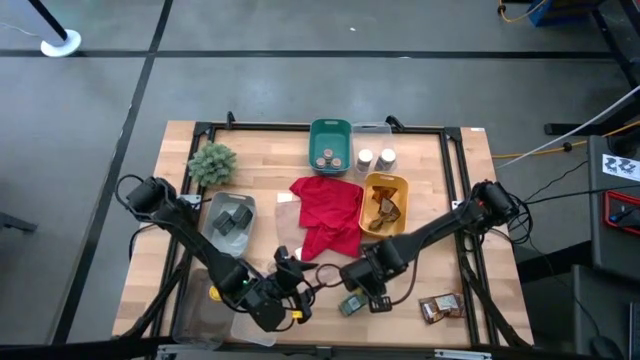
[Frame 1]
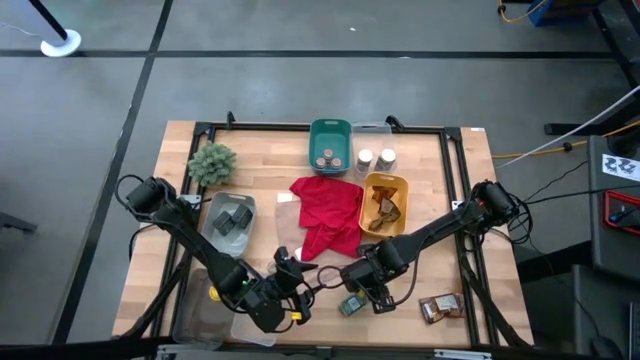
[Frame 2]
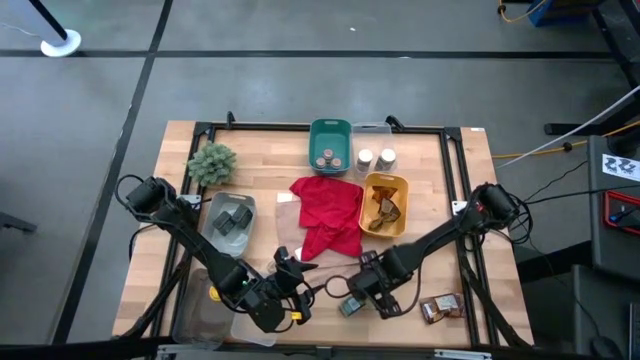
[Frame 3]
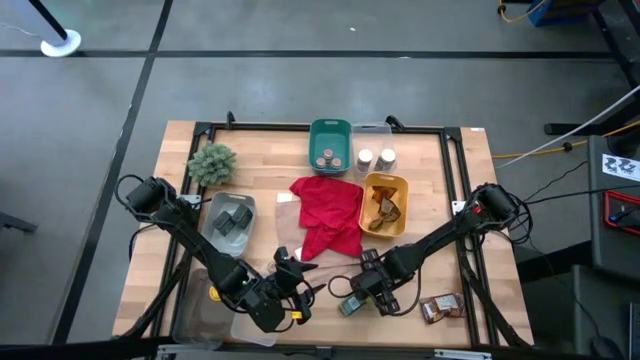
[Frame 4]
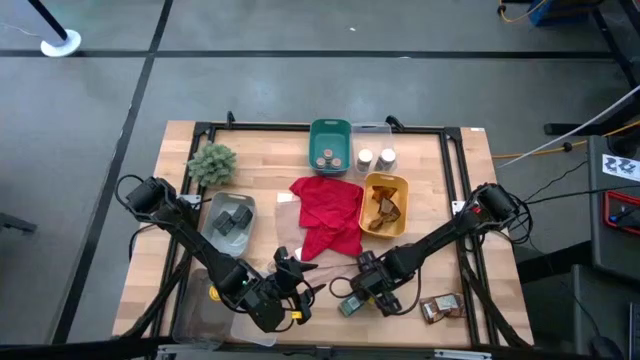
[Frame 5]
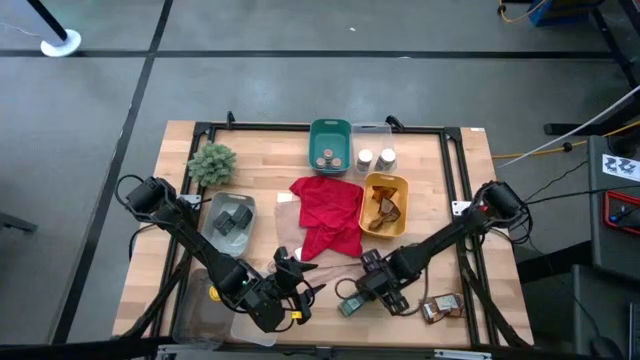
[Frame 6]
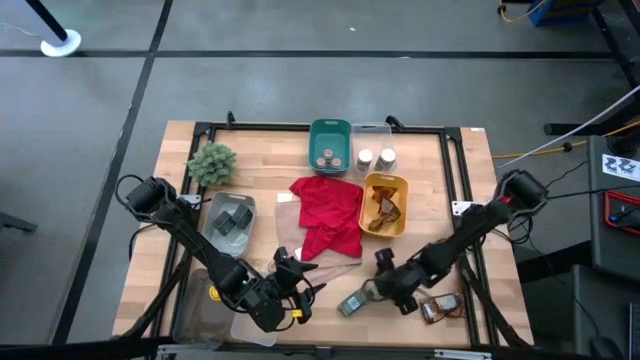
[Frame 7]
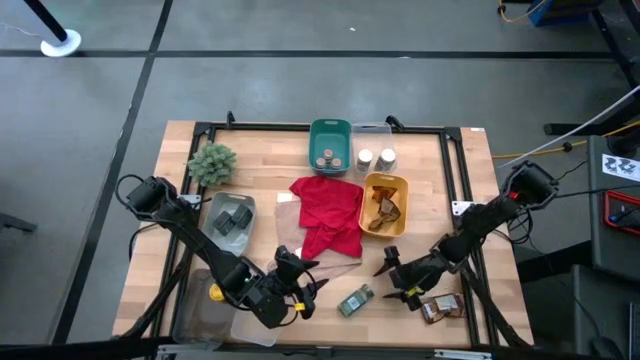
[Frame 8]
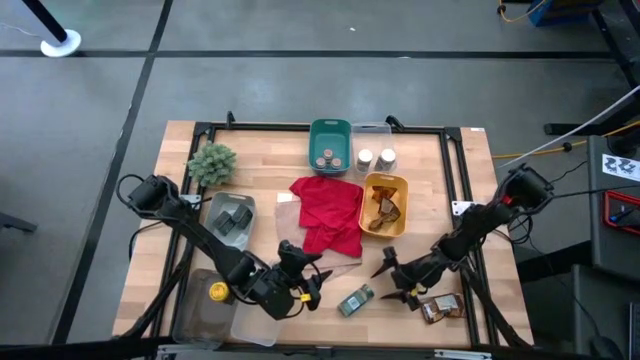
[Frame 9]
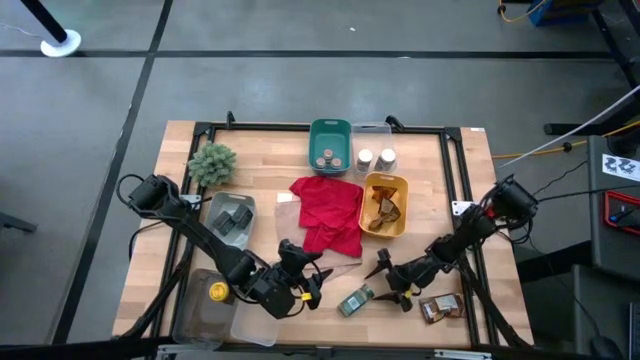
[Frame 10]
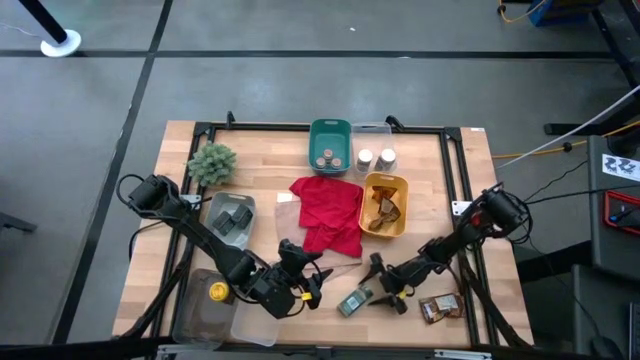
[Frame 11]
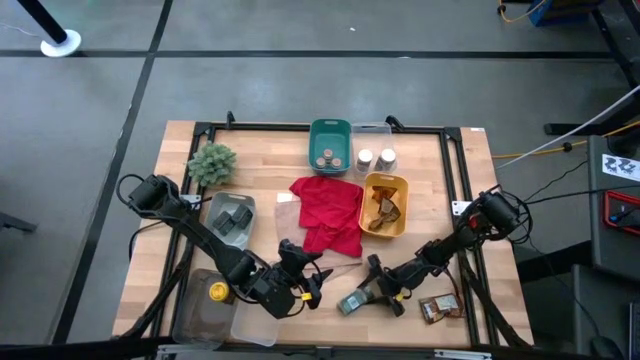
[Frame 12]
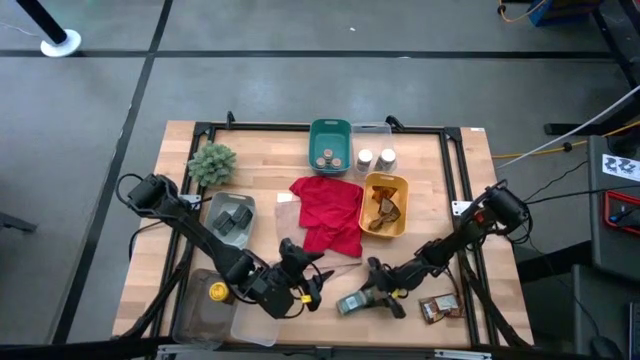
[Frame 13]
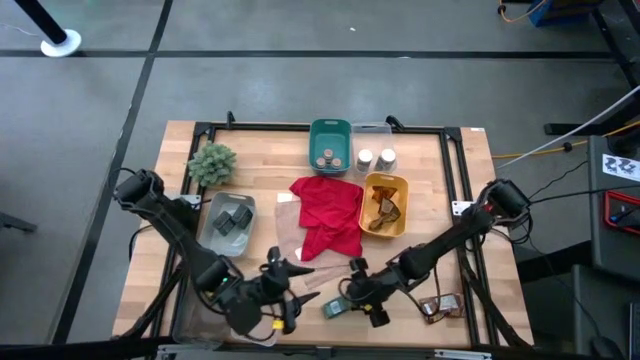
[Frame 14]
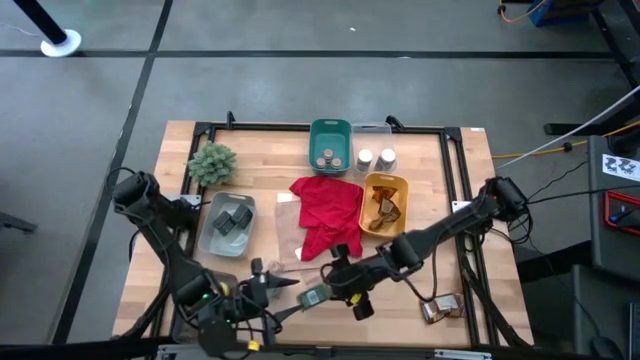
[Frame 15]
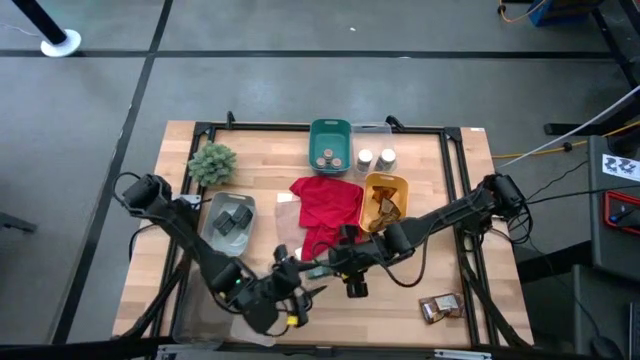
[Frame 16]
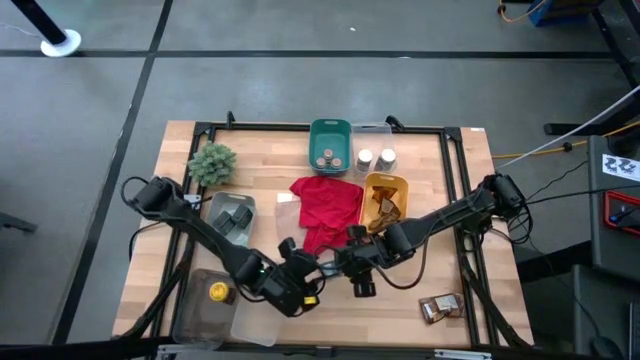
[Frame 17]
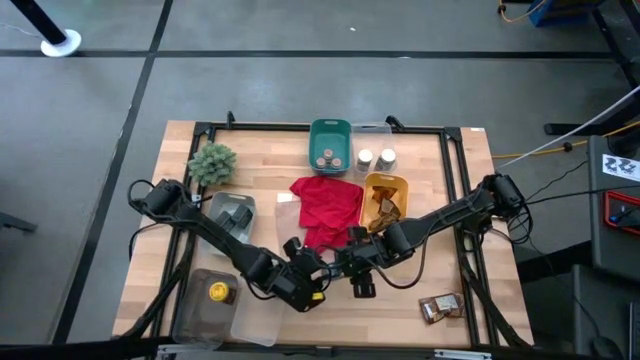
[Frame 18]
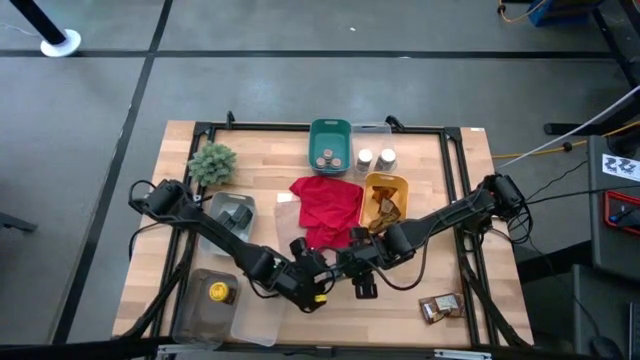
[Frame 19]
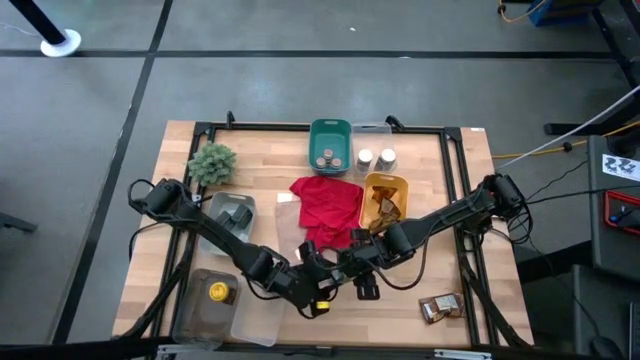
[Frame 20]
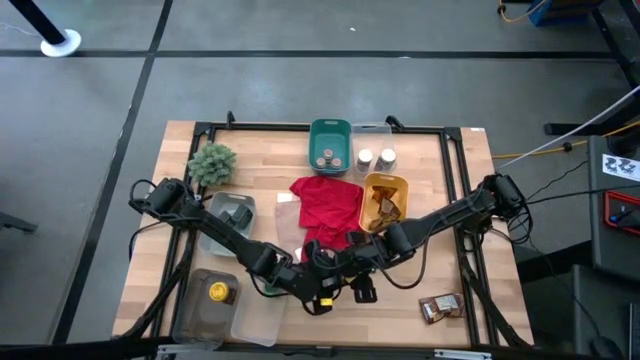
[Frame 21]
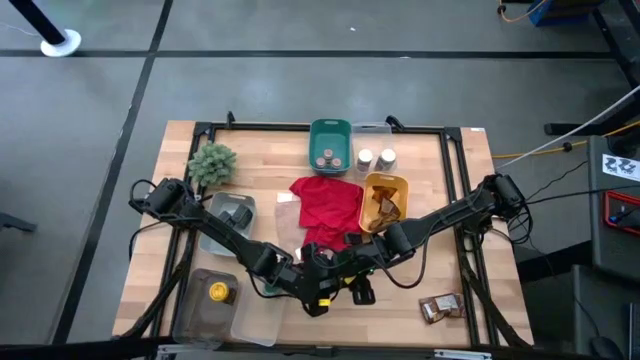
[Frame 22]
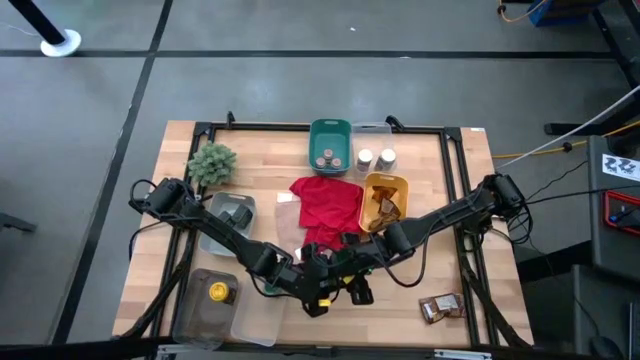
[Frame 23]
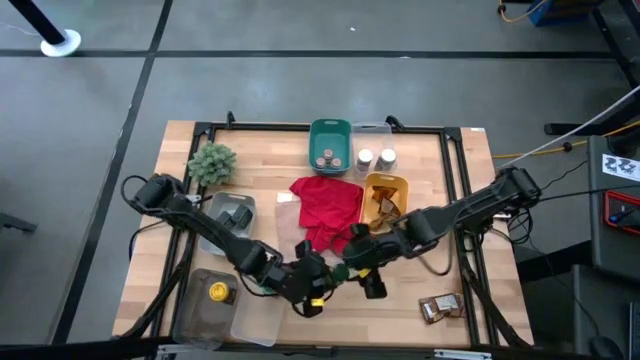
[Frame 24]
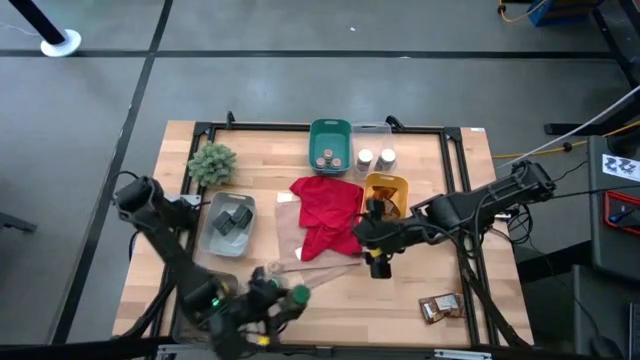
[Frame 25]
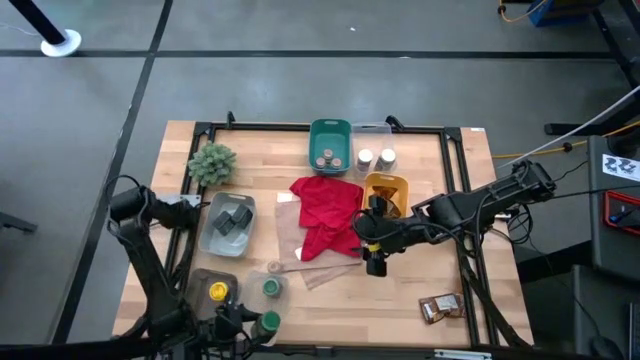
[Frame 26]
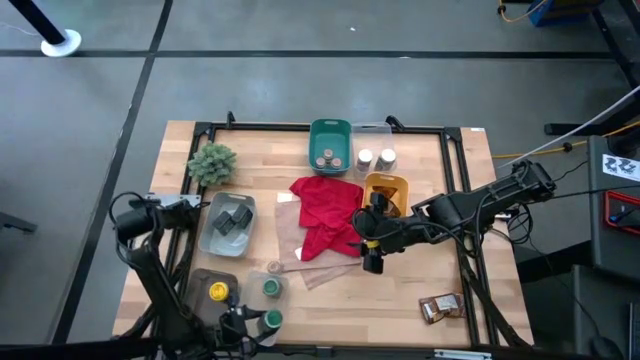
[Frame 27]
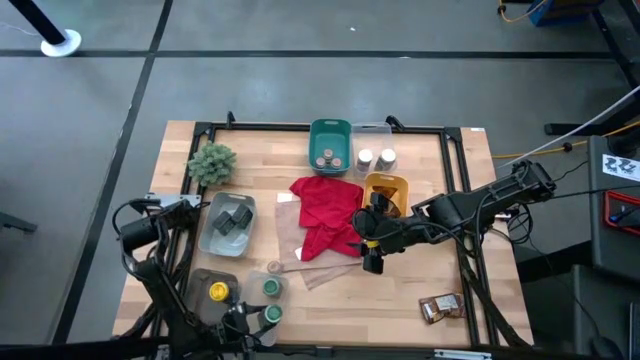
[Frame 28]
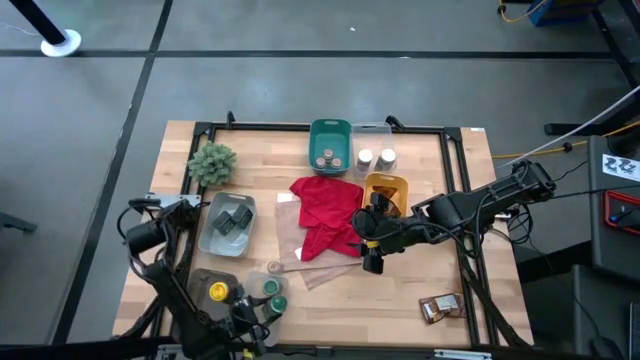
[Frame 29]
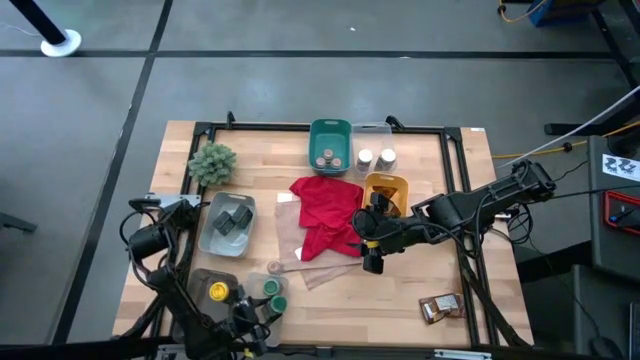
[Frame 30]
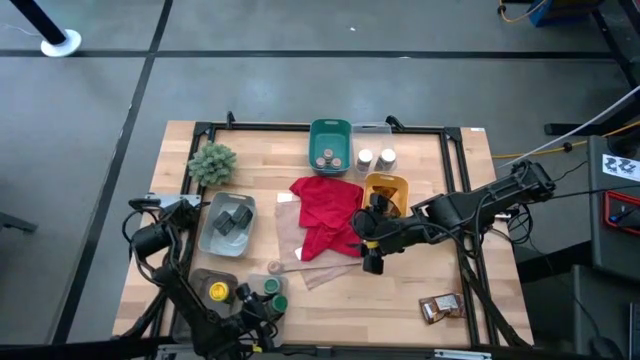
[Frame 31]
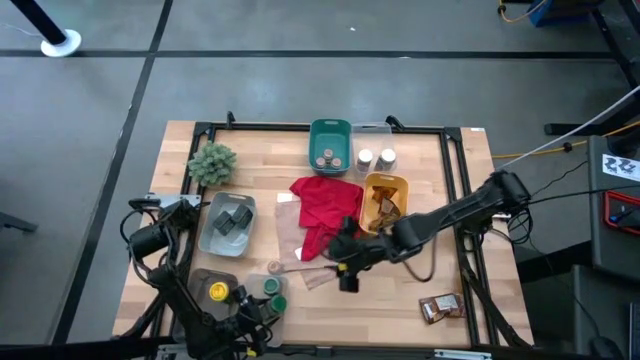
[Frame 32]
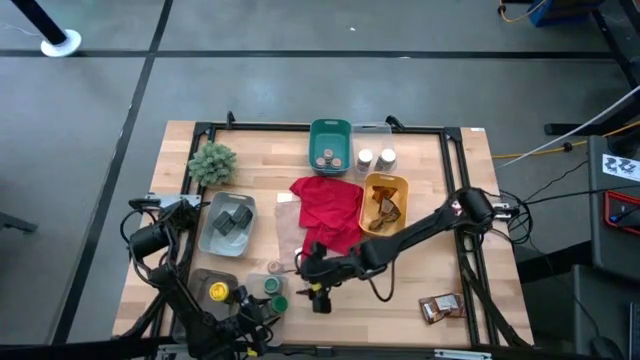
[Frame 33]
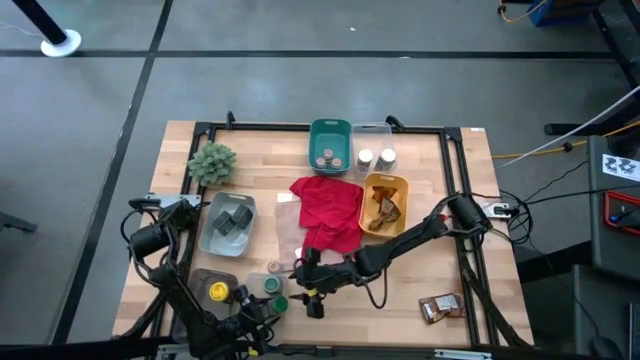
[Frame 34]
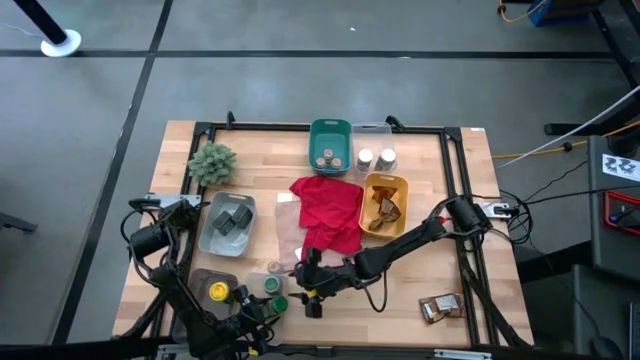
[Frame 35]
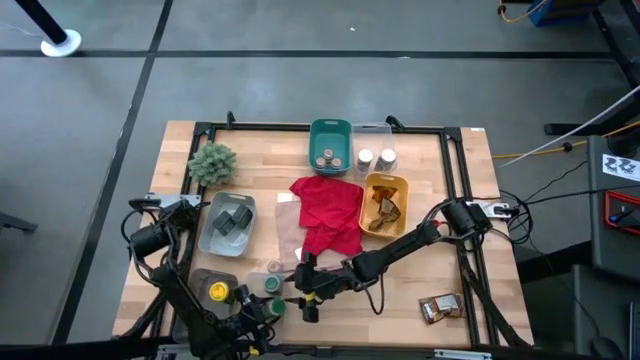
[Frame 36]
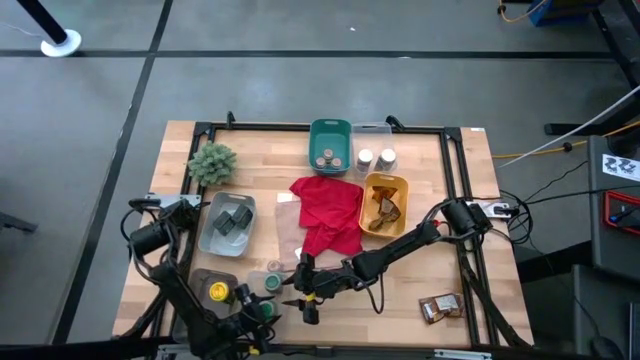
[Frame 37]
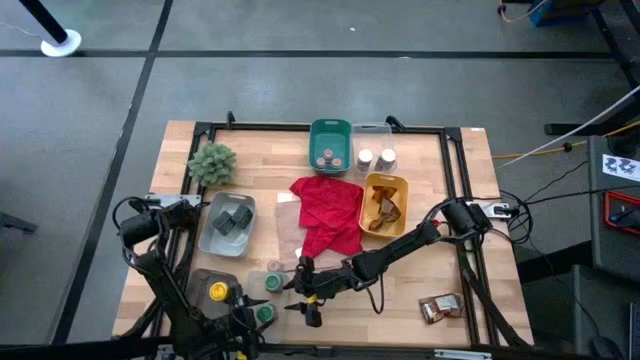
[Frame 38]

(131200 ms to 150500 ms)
Task: Sort spices by type
Put the green seasoning into the bottom left transparent bin

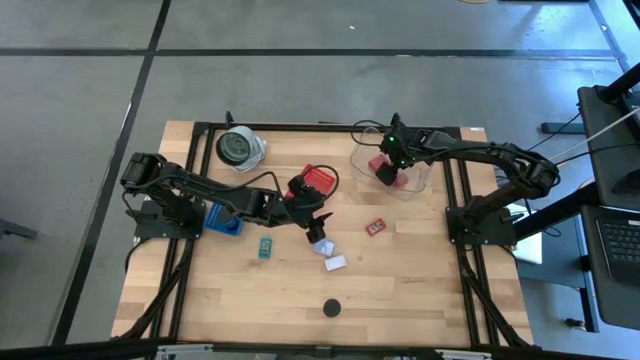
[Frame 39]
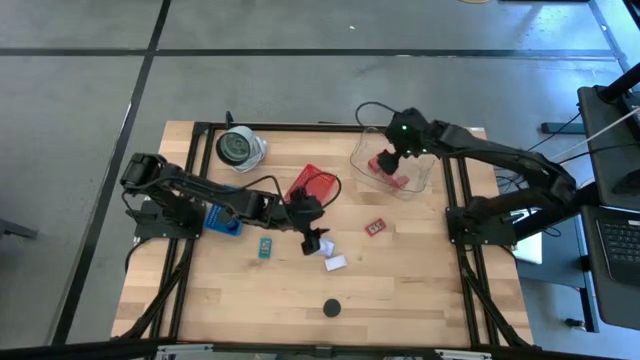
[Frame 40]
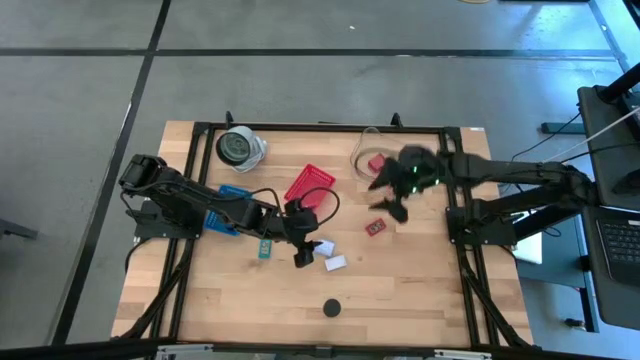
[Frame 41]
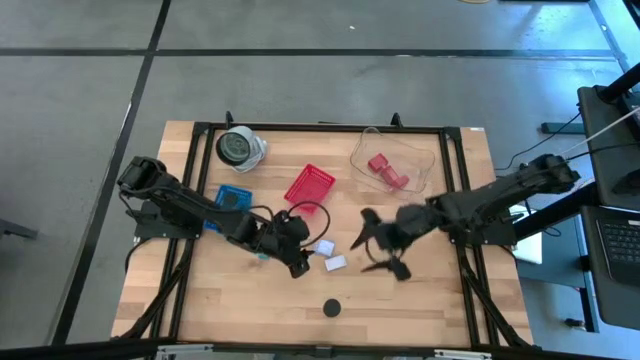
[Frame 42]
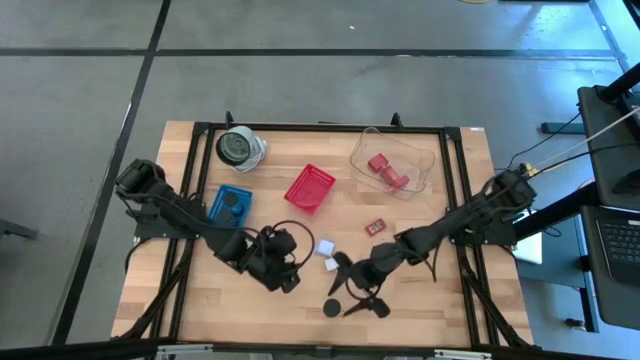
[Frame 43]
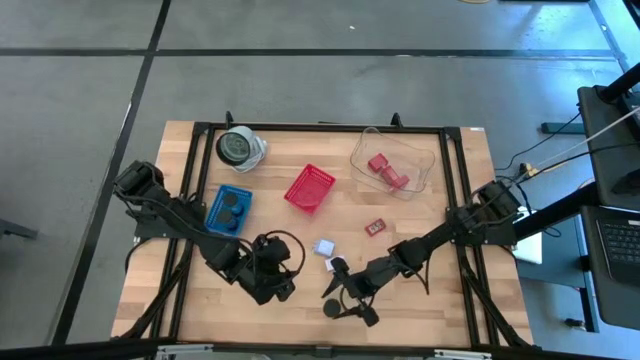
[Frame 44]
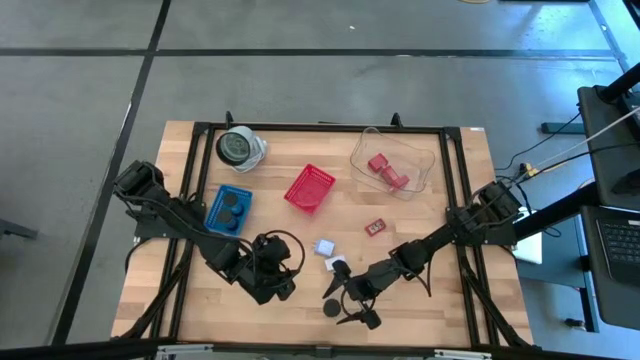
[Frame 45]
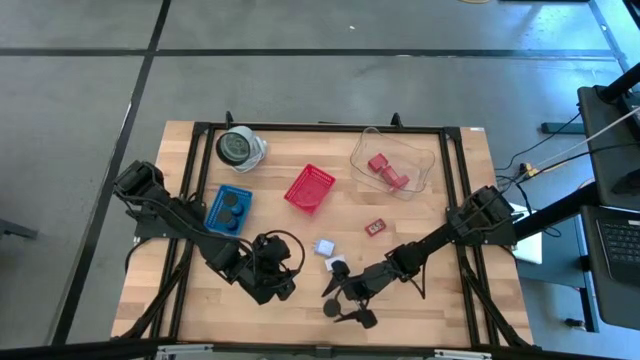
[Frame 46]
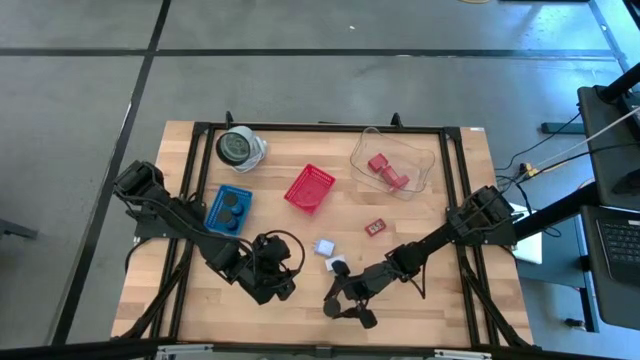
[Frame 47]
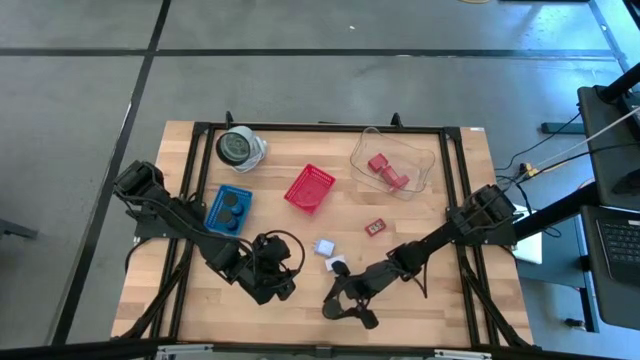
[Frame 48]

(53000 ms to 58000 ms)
Task: Pick & Place Office items
Put the white hourglass into the blue bin
